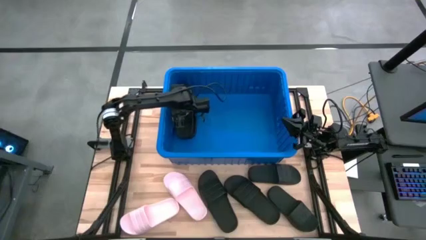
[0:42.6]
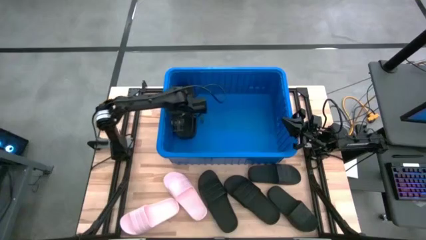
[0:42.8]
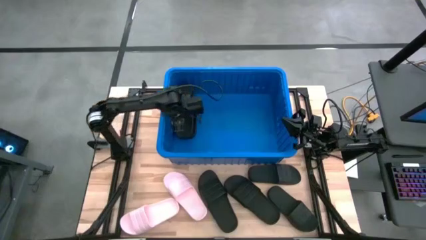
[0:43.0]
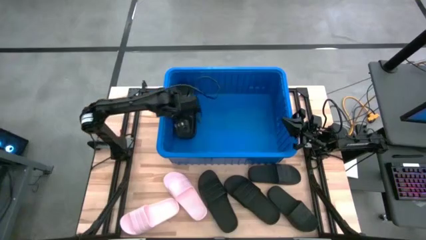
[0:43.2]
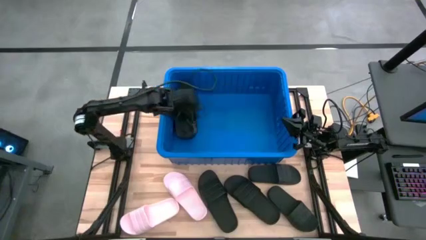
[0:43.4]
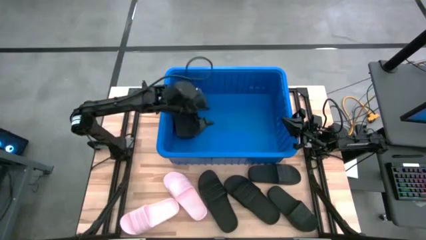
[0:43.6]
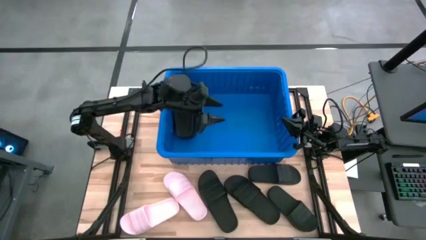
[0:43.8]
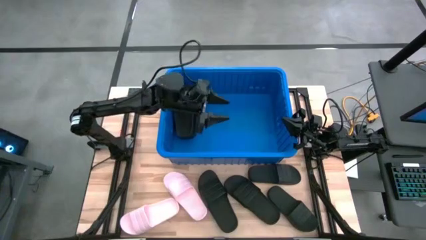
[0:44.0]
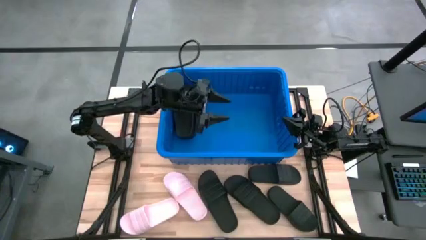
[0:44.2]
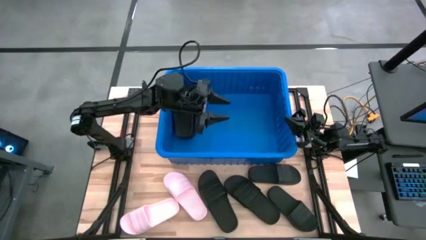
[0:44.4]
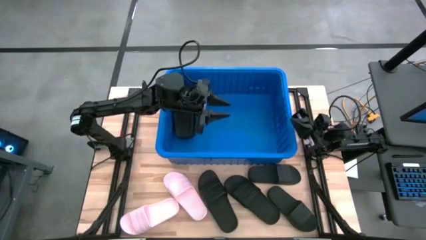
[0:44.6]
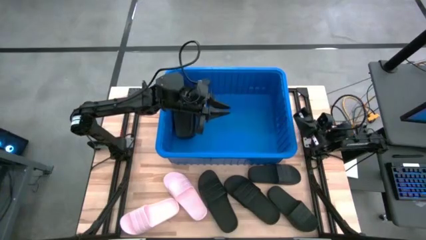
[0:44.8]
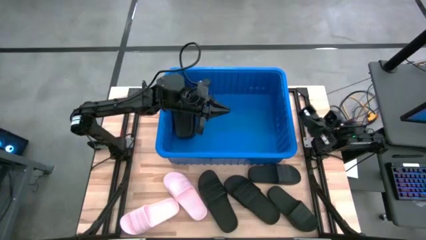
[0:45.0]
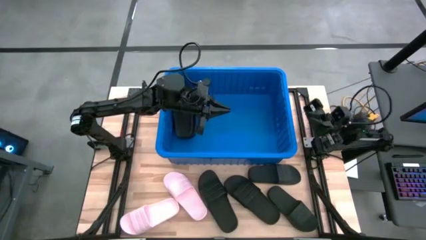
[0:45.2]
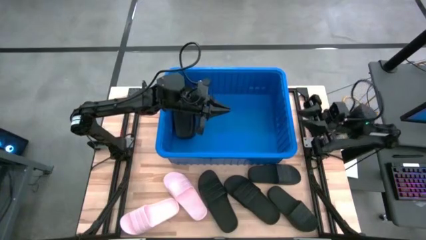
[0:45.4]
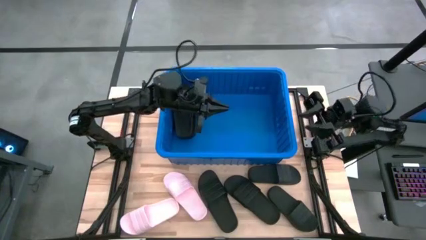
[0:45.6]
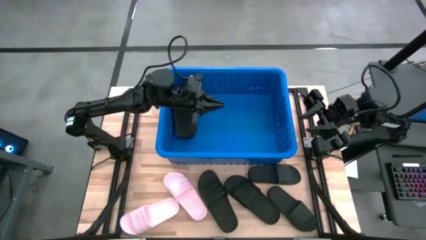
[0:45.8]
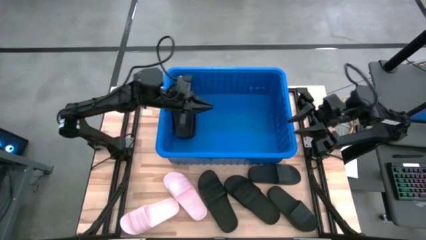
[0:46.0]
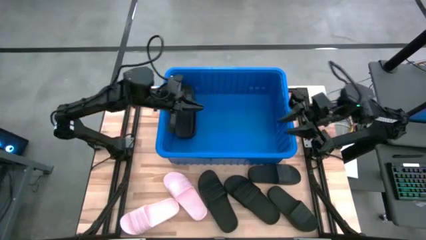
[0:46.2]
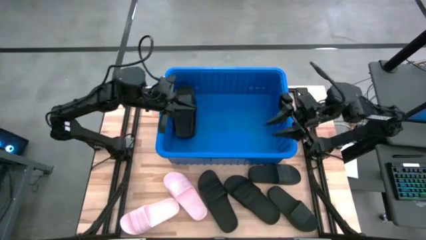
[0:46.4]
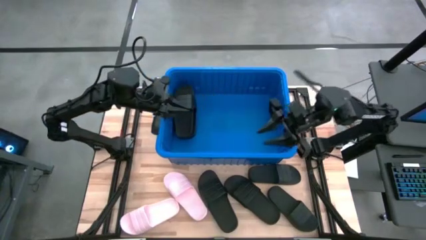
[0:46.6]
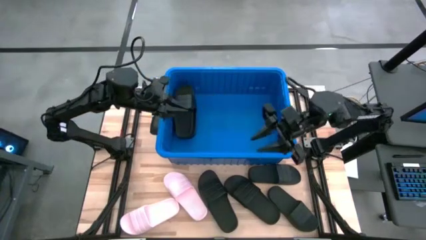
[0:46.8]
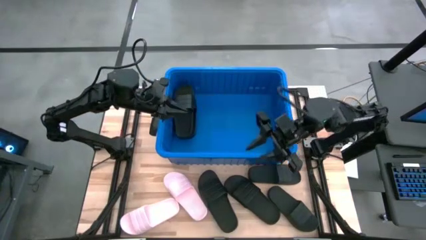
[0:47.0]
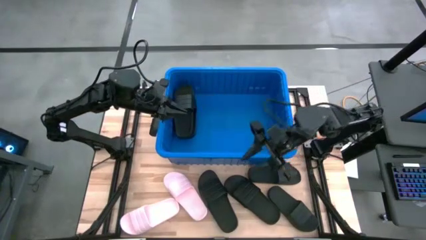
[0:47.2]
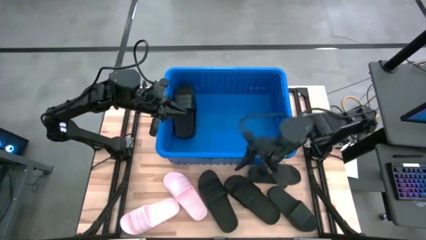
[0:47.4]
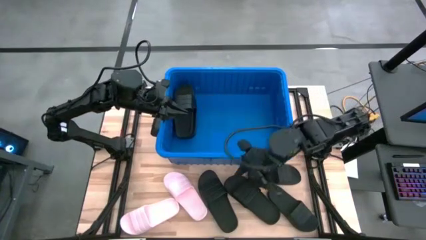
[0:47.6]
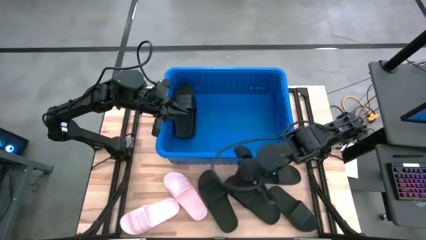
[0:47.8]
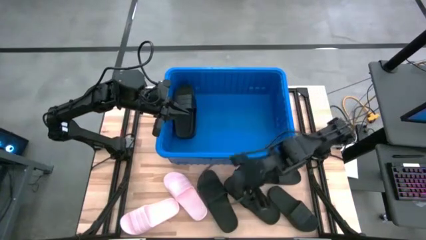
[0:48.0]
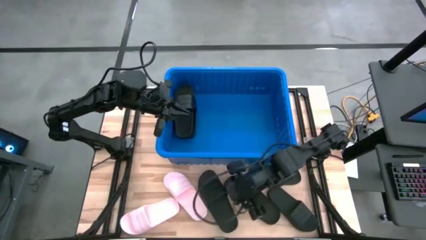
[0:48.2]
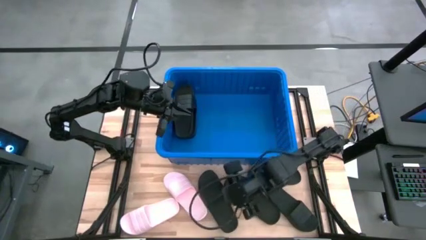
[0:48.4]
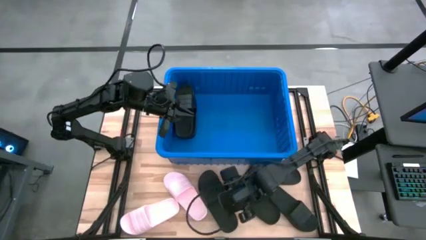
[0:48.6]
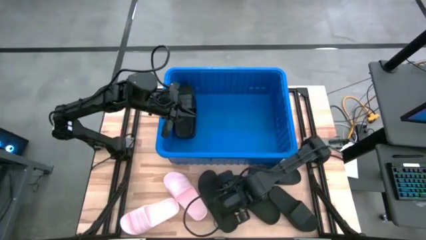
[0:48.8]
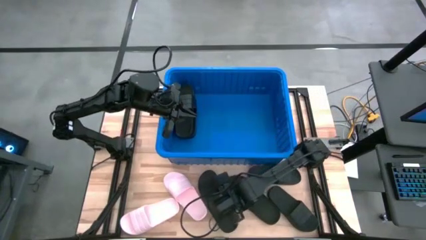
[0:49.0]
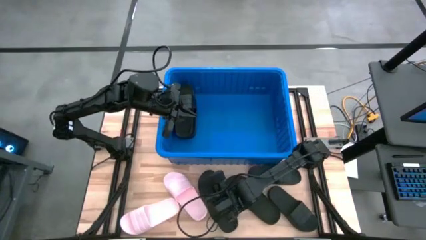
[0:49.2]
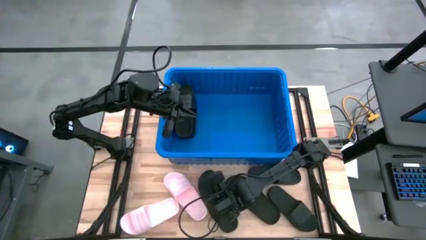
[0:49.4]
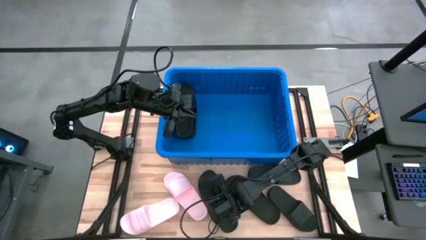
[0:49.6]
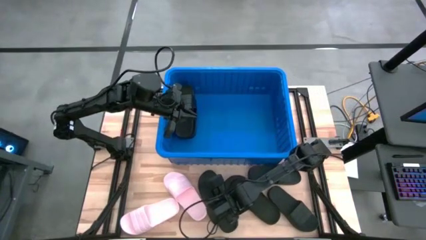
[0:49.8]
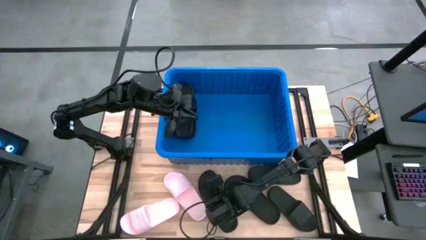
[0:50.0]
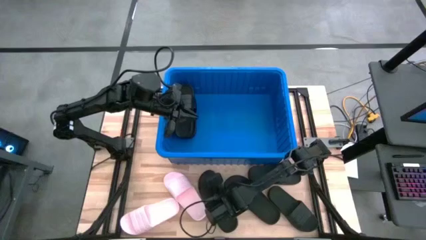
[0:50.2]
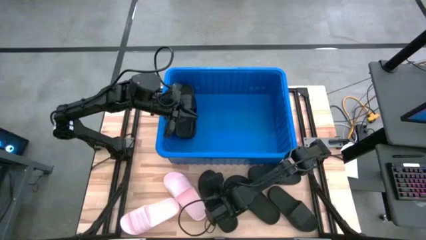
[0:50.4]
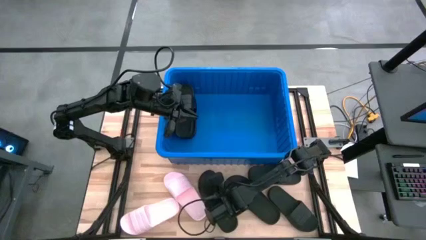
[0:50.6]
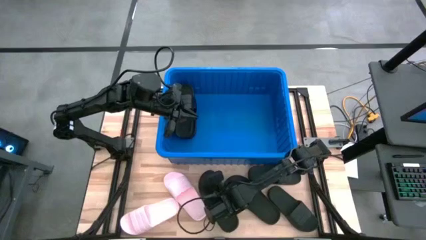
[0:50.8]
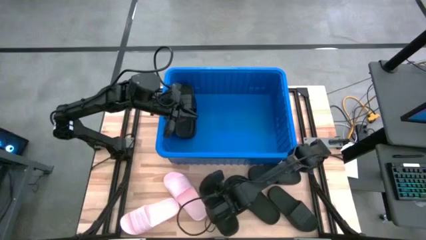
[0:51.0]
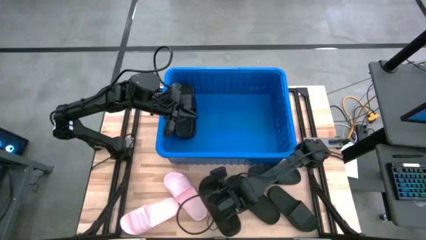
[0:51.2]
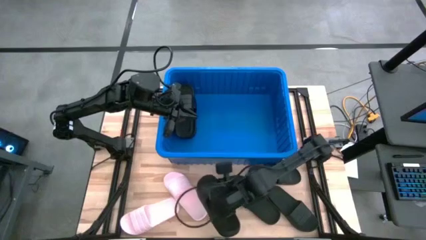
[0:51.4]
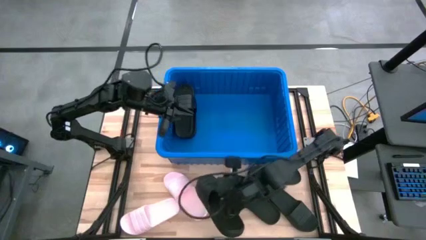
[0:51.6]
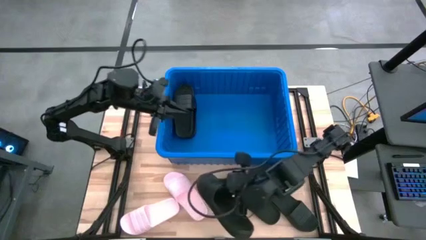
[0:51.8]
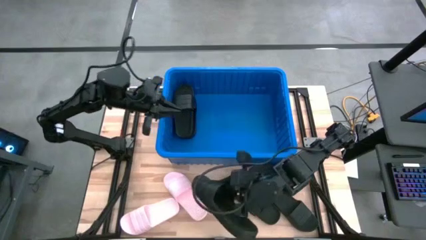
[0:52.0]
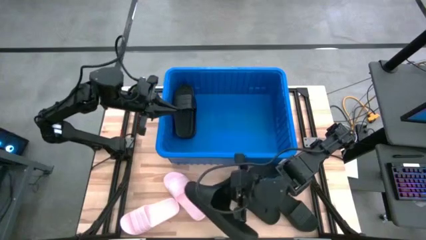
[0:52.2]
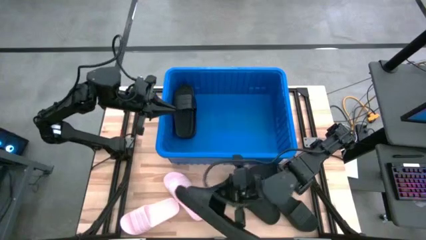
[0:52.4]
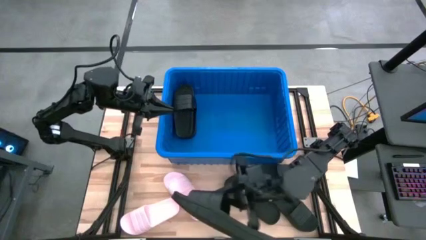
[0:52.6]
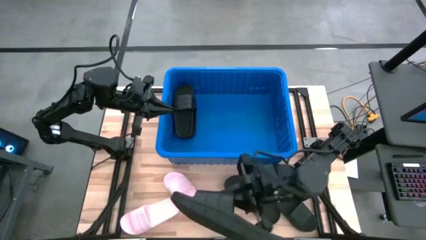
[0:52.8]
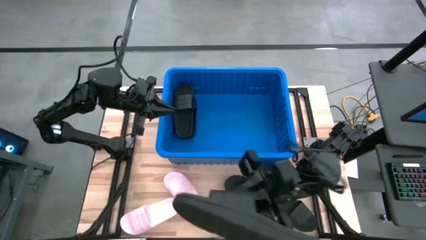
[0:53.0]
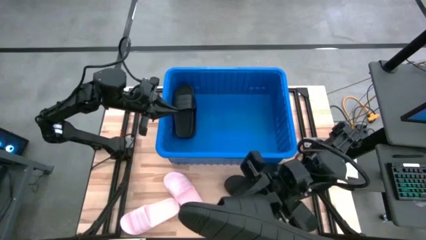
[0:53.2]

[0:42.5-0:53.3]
Task: Pick and place slides into bin
Put the black slide into the blue bin
